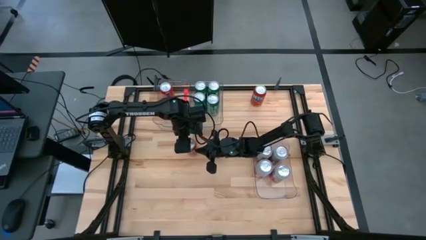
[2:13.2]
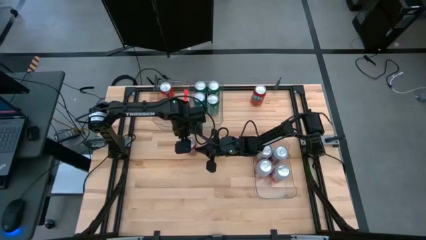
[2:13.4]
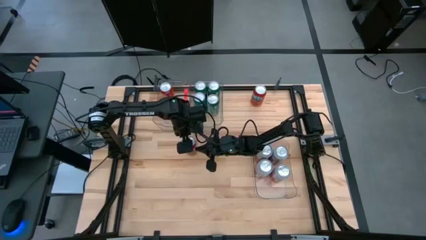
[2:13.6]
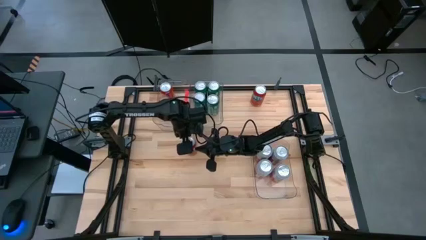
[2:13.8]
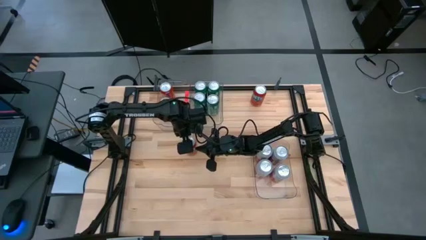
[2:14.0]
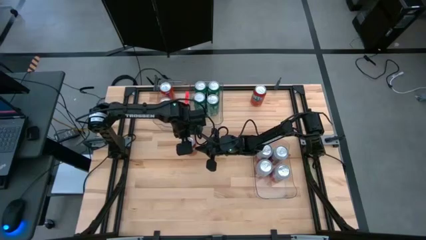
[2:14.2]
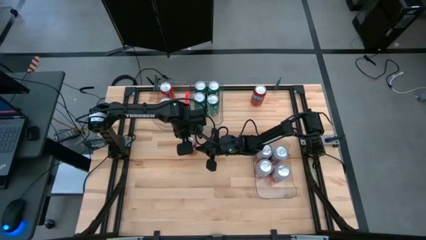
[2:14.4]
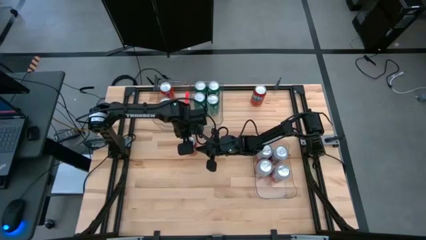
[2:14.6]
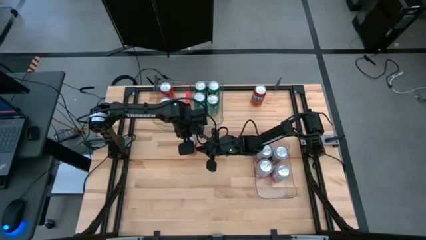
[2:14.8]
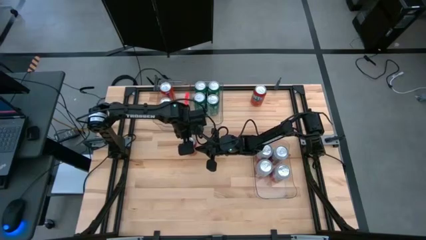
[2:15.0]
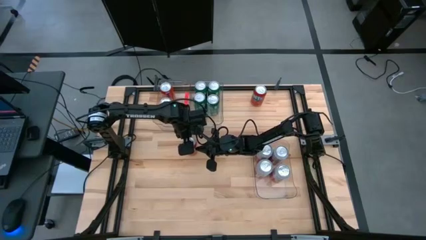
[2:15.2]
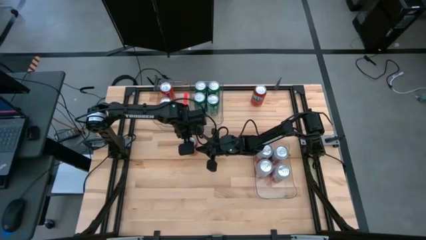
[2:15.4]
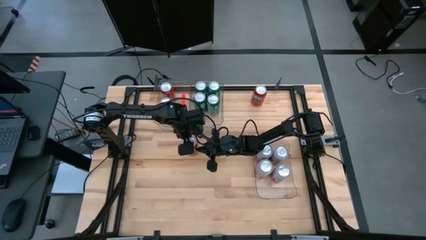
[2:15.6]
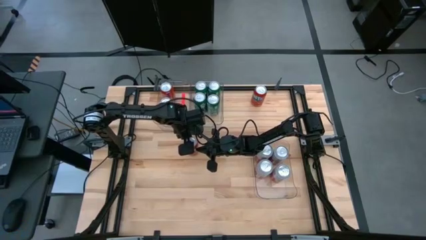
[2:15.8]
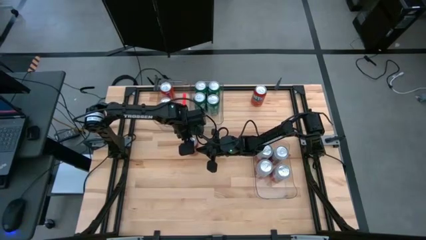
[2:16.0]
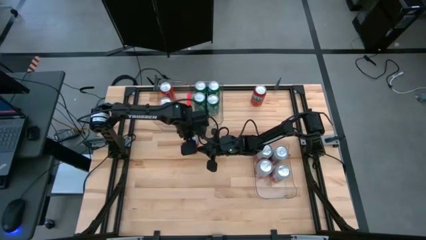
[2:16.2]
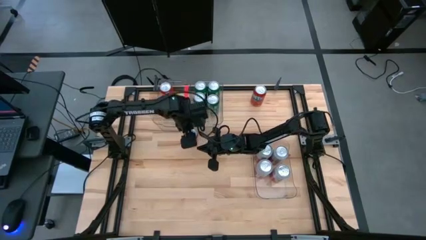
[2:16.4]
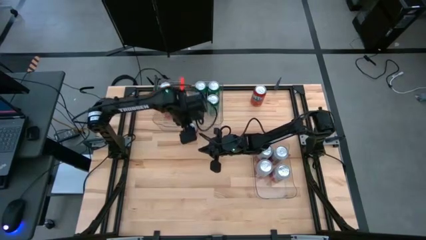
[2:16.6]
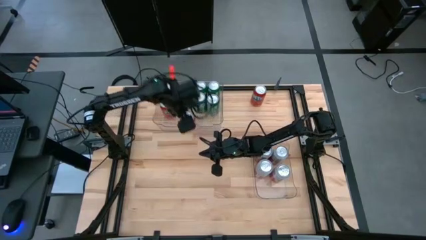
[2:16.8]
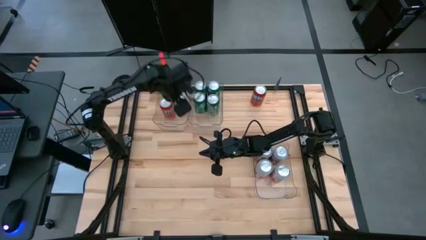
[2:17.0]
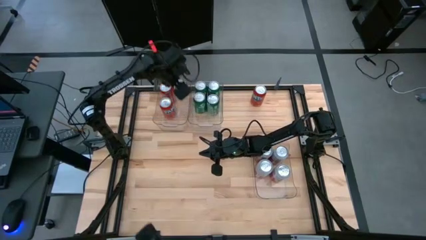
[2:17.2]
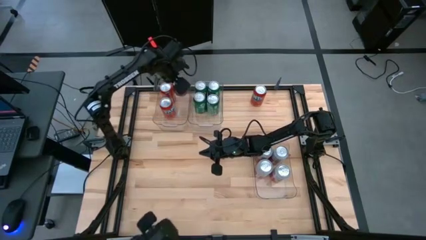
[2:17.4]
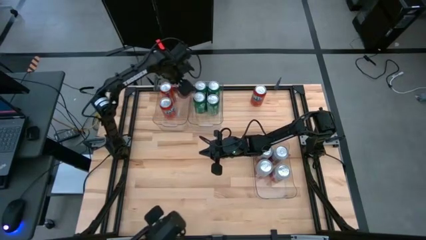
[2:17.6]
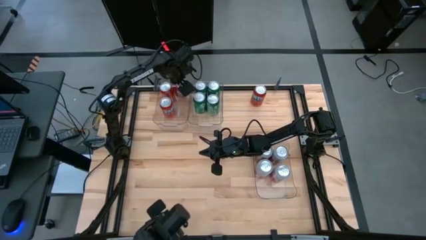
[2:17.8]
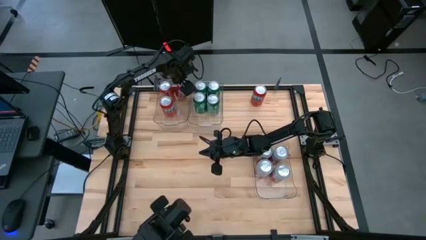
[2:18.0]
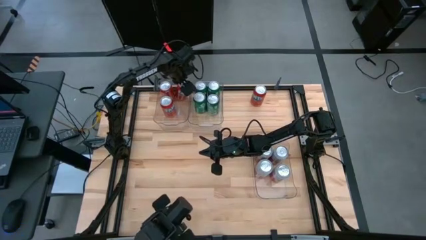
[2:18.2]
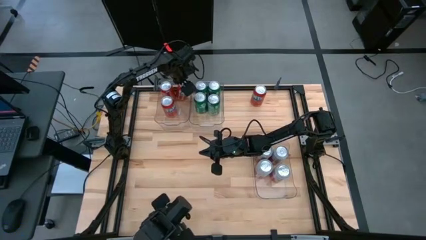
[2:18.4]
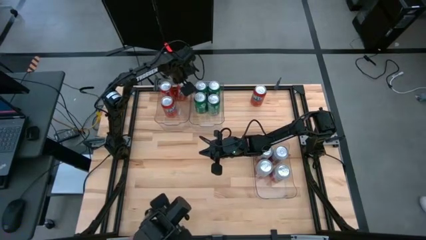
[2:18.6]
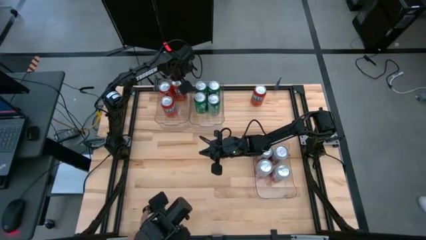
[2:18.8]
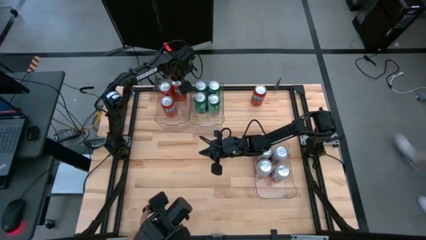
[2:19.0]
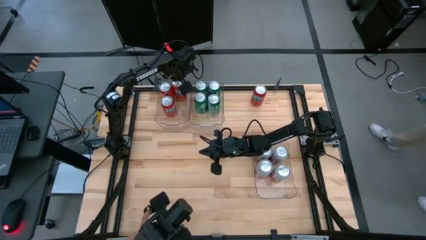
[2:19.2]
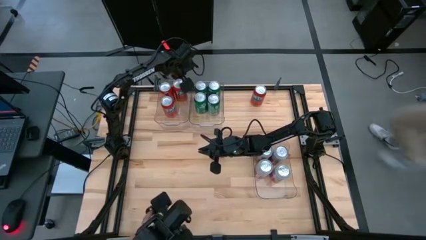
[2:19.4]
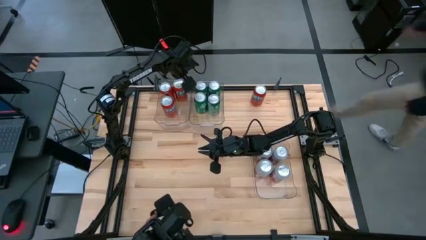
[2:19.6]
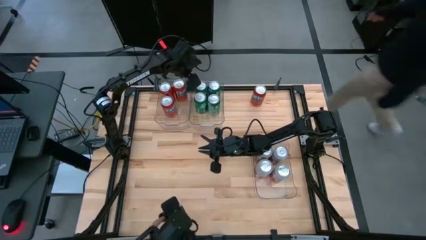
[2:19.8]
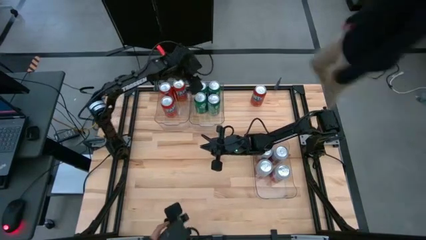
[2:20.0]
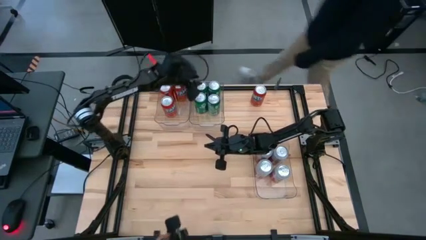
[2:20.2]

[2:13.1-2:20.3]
Task: Sort soda cans
Put the bottom red soda can into the top left transparent bin

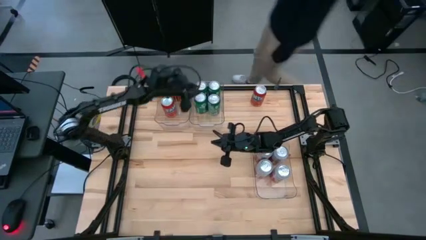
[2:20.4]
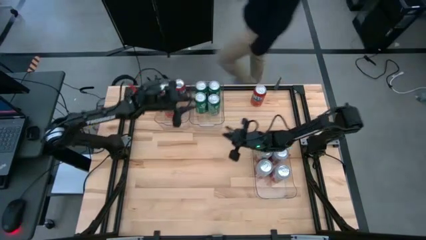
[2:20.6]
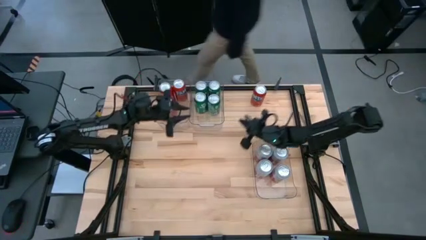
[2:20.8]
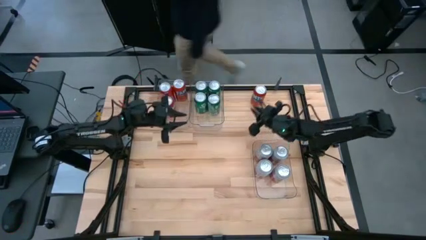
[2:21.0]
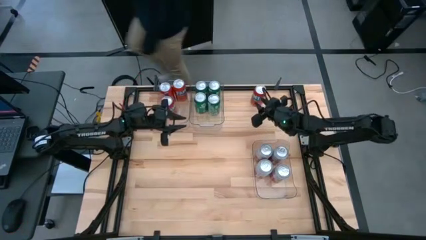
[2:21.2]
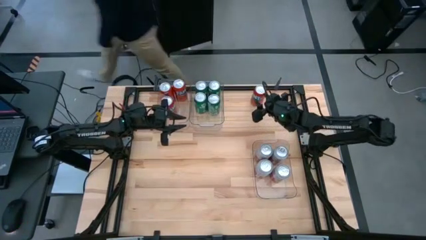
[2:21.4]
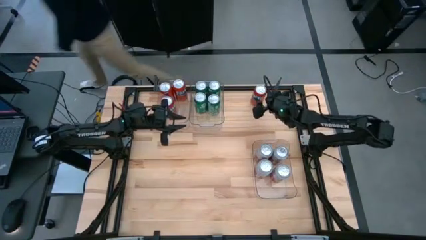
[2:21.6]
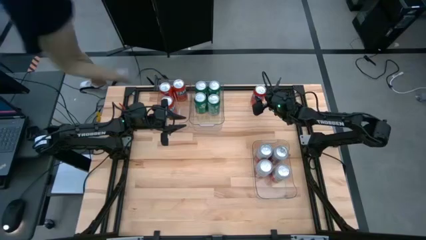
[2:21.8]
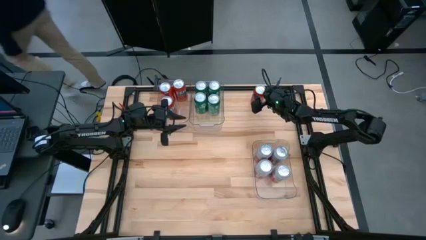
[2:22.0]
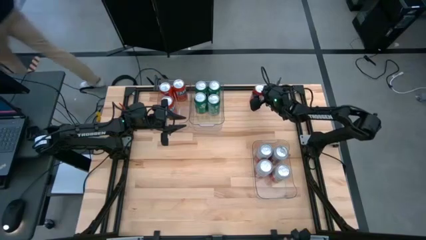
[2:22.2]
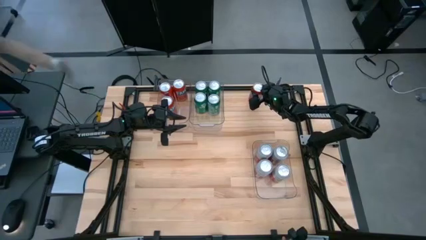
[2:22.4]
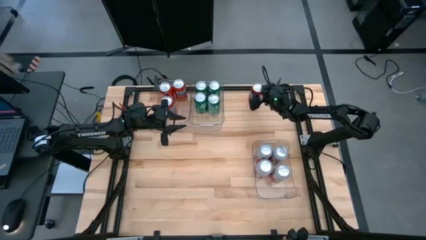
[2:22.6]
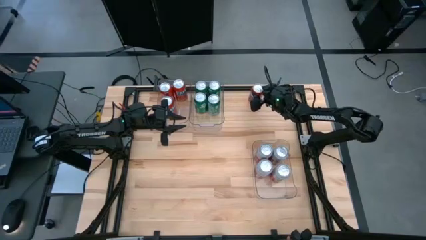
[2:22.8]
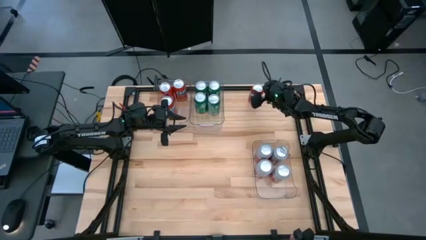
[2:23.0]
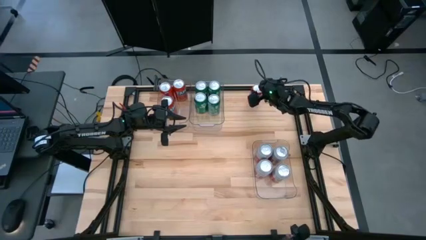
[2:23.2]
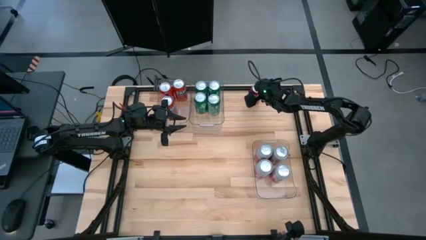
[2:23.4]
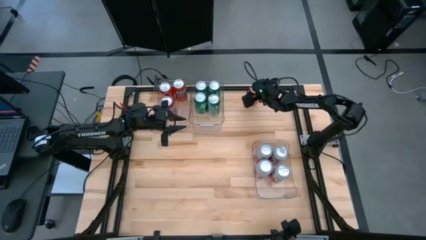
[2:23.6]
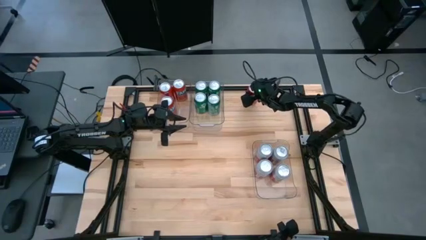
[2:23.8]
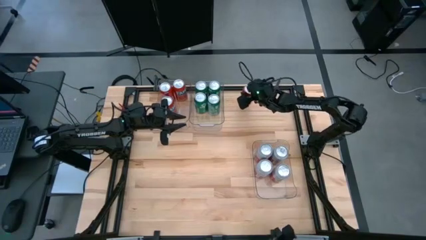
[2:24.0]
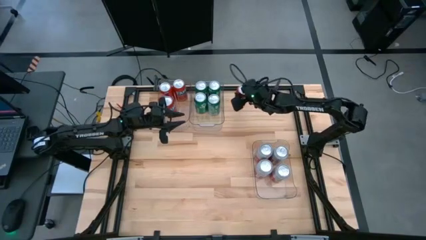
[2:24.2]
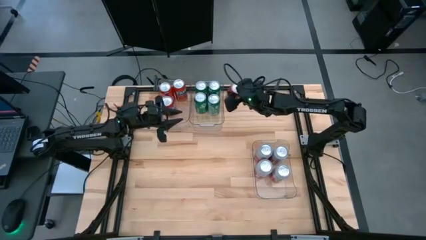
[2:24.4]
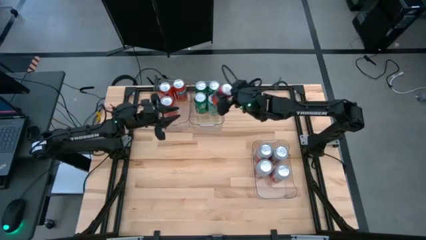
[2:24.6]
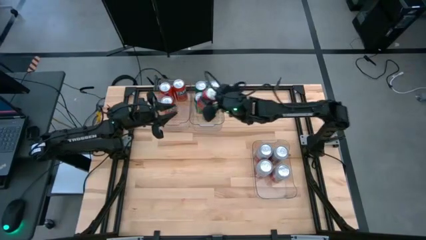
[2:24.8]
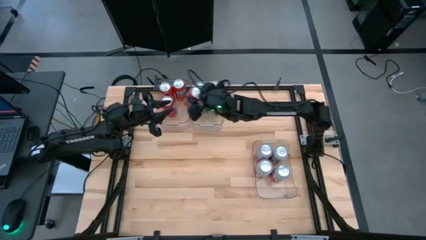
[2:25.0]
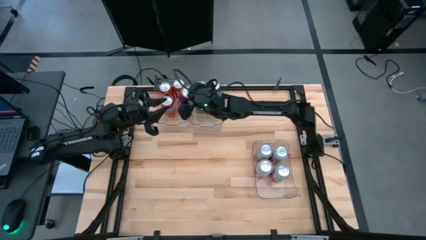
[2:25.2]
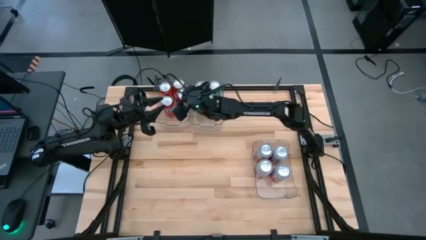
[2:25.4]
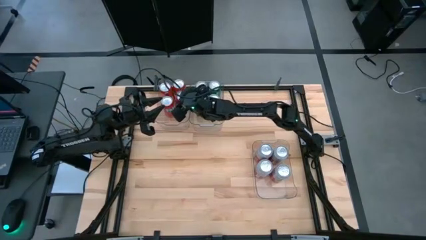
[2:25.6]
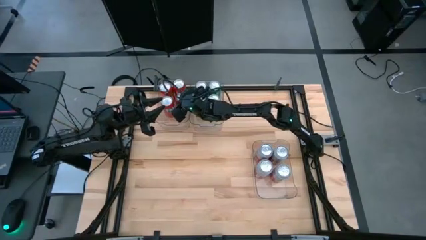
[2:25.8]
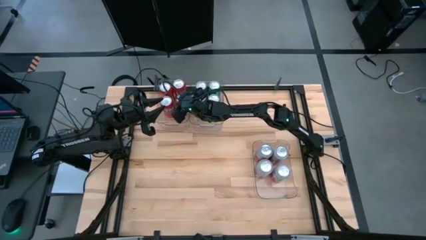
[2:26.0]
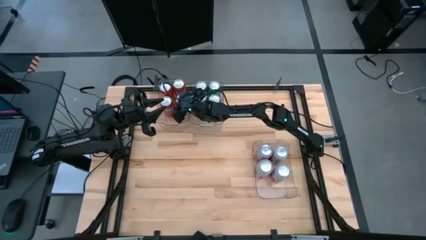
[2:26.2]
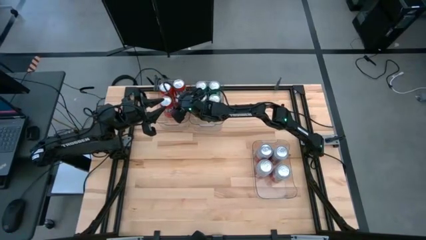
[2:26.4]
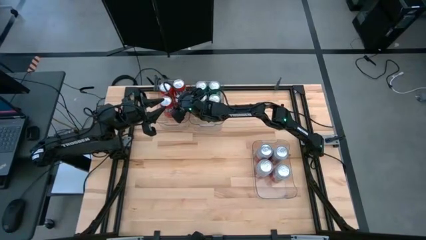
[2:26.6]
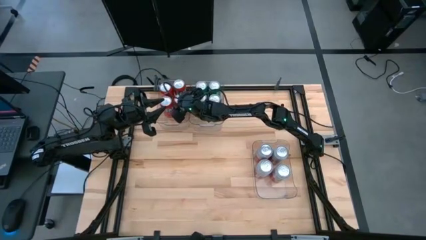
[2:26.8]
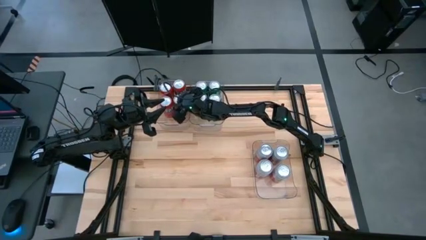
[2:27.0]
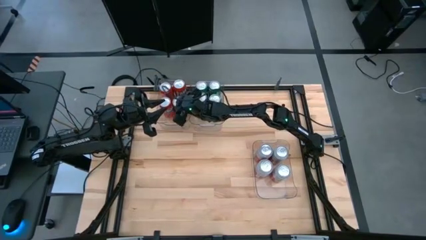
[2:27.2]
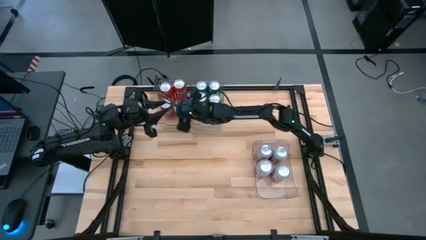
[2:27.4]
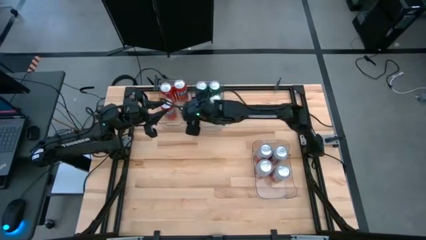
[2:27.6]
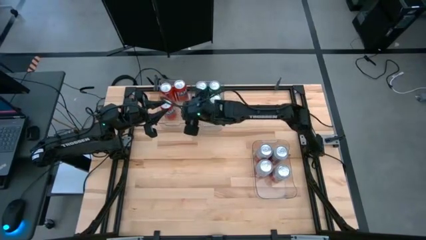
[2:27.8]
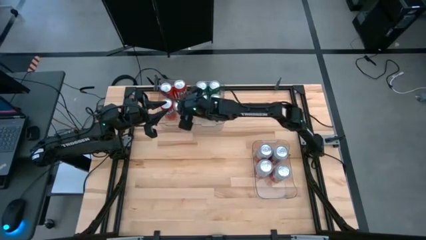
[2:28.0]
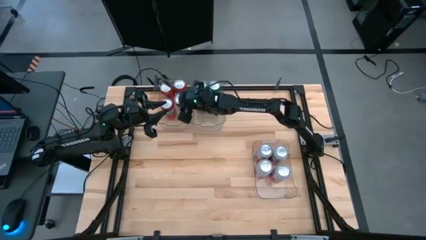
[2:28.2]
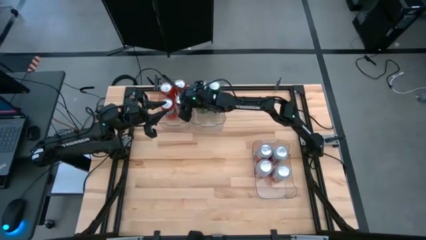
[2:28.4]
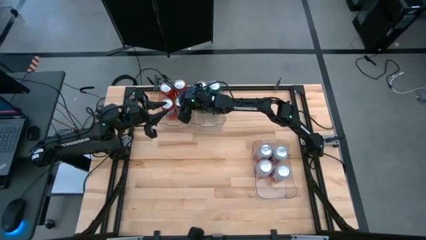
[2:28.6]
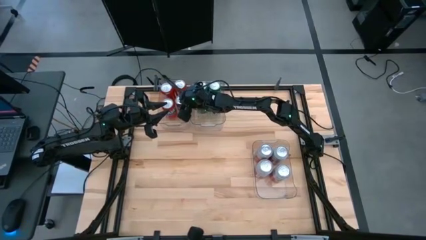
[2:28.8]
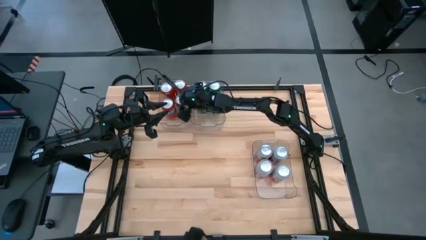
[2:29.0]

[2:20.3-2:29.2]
Put the red soda can into the top left transparent bin
